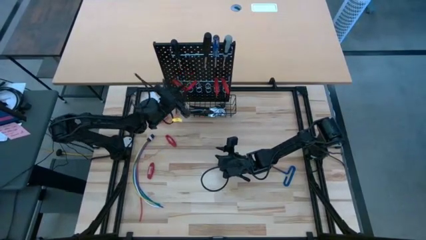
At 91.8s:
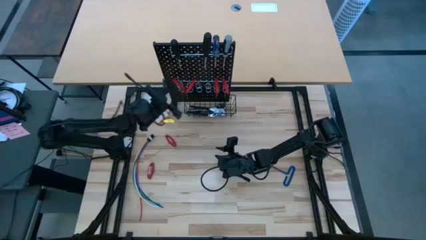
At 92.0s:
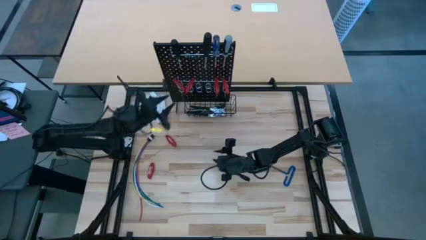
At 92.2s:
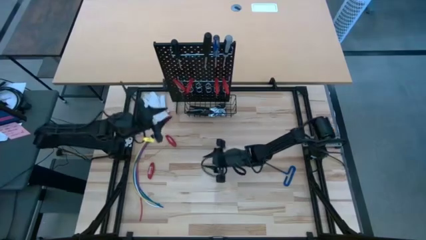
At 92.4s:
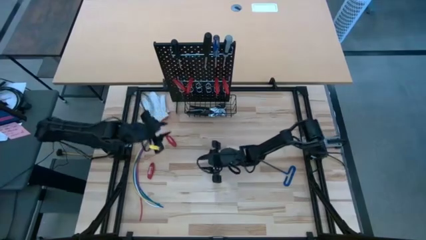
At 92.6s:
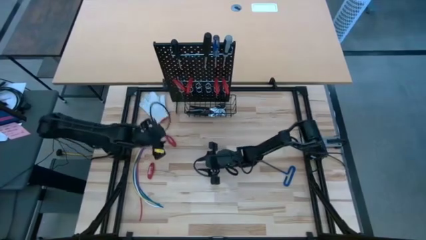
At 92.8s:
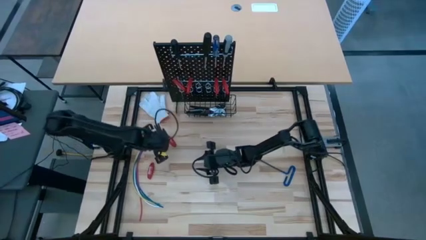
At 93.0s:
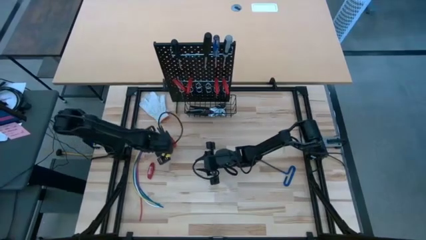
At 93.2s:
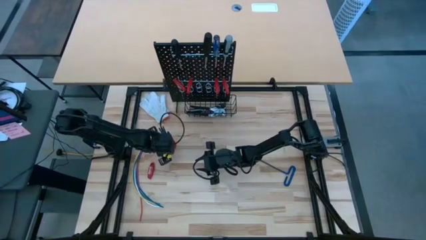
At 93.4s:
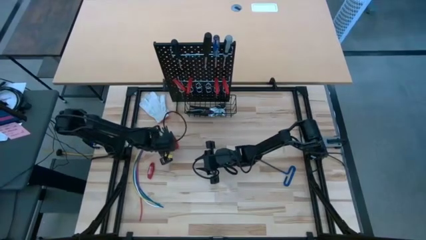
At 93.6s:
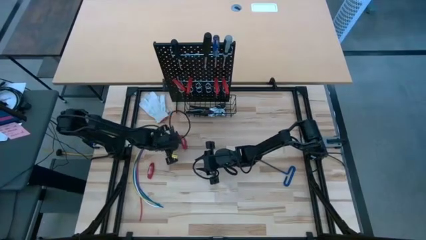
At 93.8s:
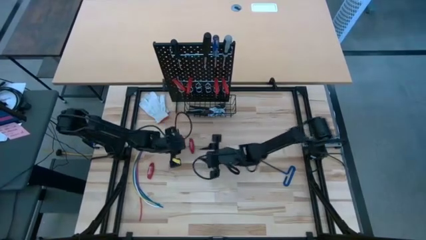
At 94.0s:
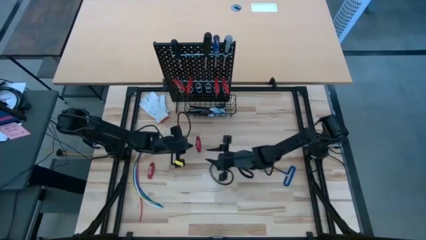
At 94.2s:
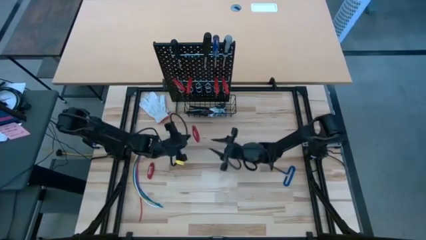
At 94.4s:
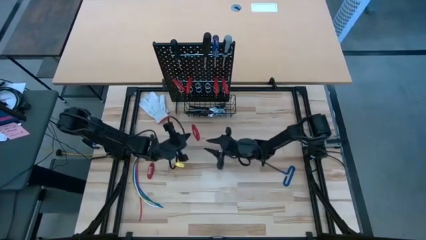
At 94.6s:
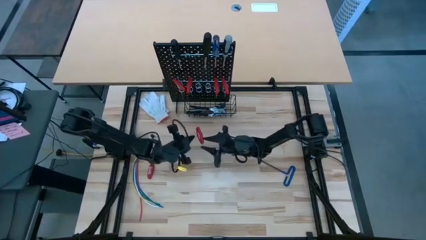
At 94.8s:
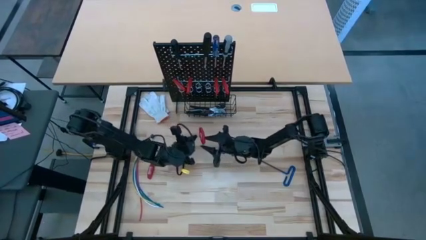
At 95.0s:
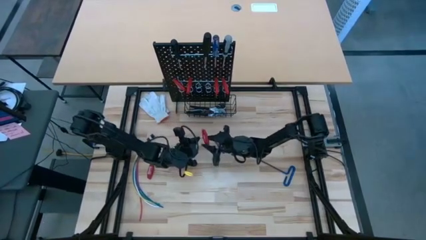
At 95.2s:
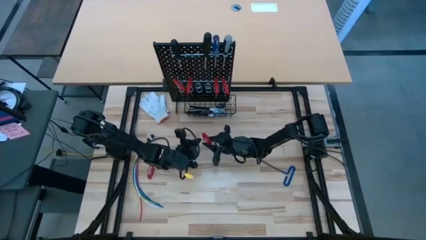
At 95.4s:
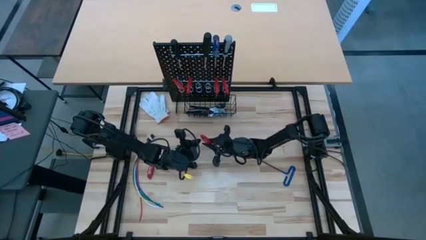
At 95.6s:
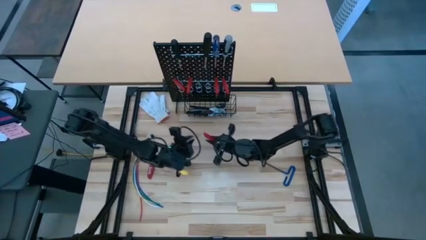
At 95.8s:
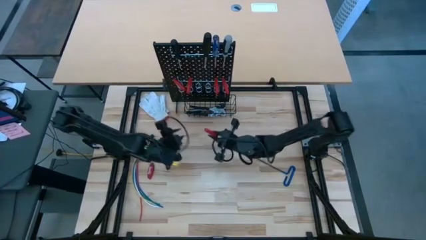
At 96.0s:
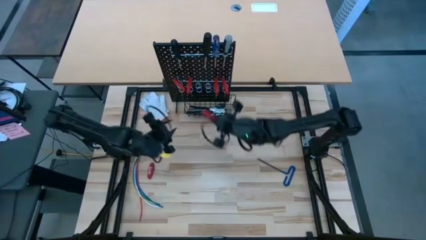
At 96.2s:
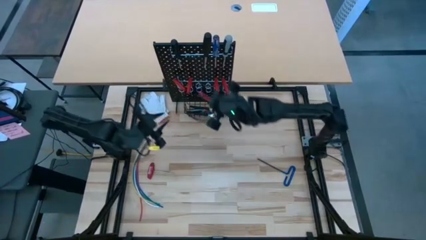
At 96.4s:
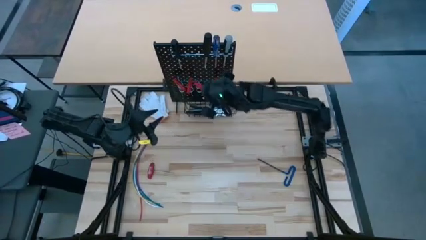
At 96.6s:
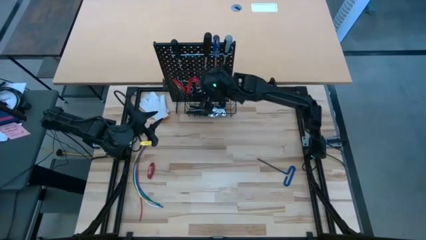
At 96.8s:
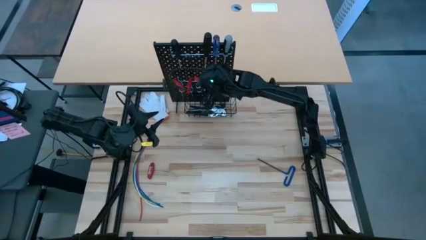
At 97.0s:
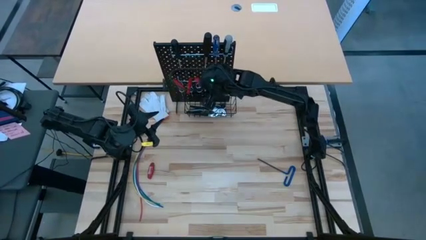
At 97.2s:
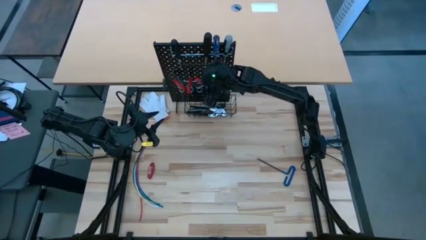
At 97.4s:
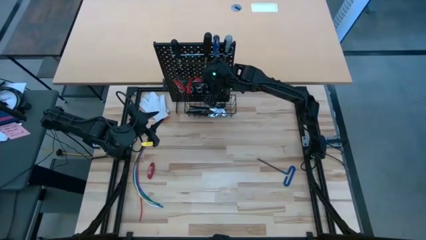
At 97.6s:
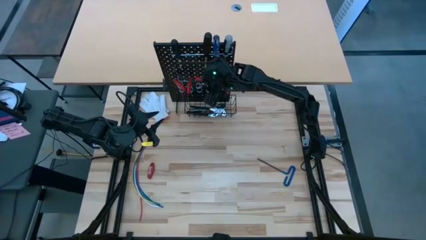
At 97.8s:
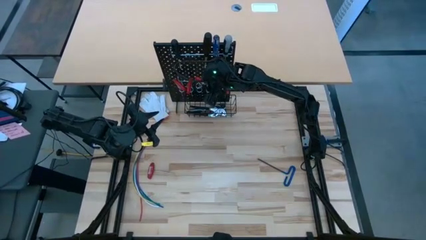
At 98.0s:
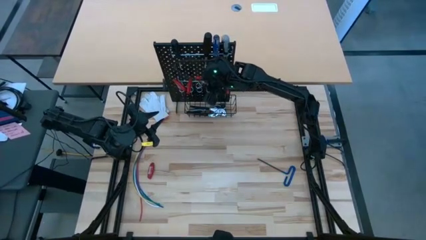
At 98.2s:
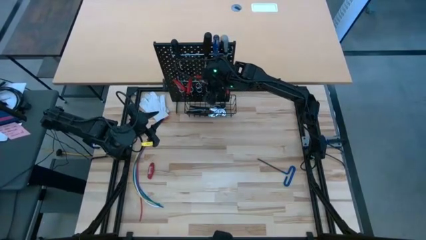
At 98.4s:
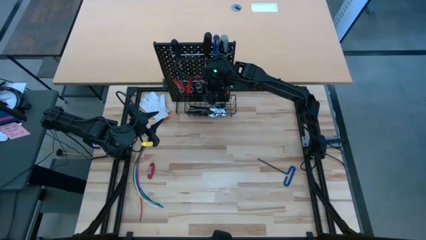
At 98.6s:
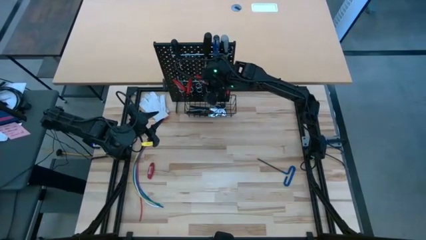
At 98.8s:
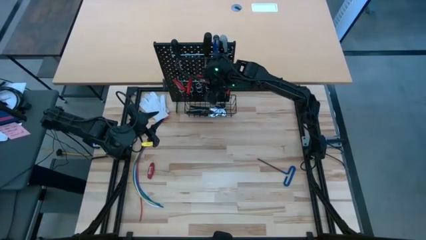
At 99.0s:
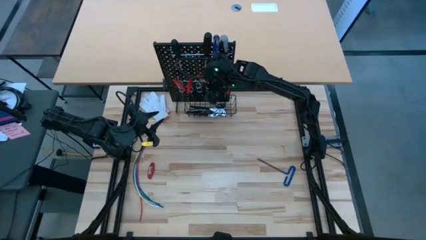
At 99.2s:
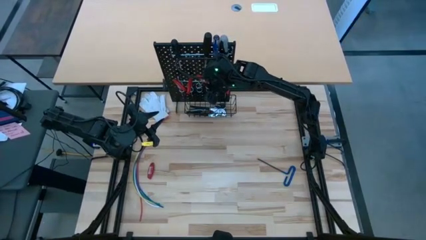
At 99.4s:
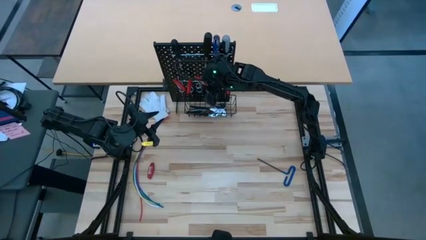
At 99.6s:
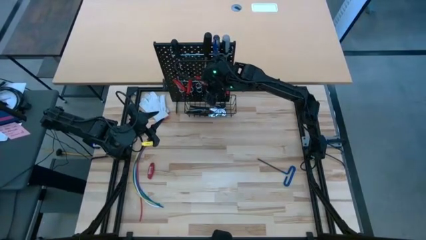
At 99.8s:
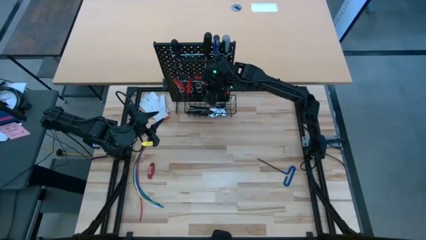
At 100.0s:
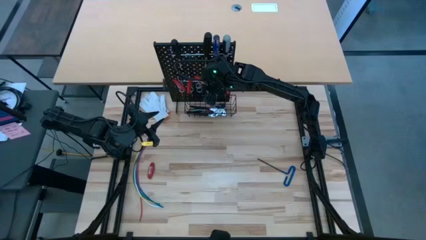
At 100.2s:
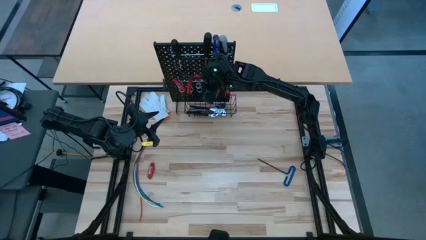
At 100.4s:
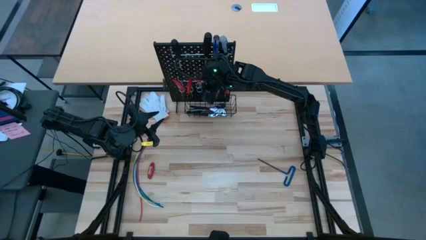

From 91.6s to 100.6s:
Task: Hang tools onto peg board
Hang the red allen wrench on the black pegboard

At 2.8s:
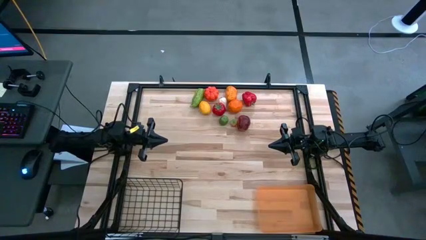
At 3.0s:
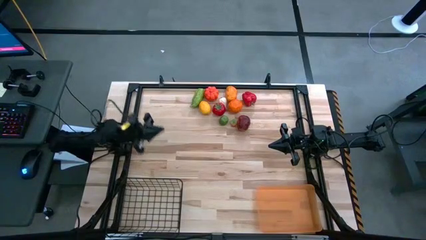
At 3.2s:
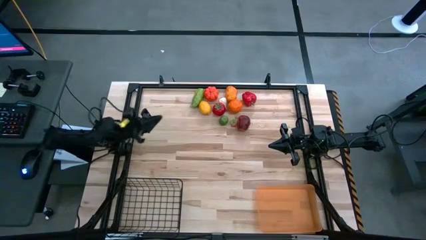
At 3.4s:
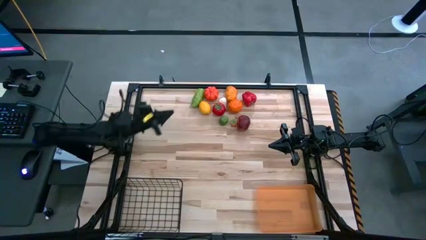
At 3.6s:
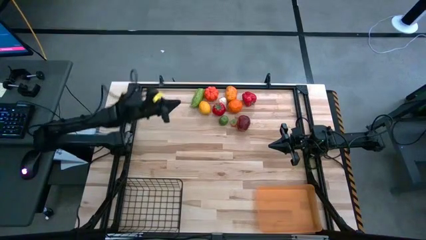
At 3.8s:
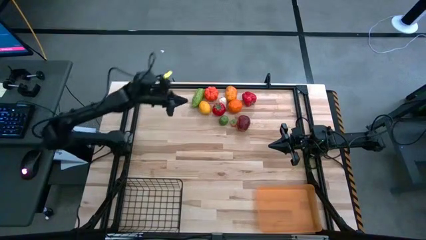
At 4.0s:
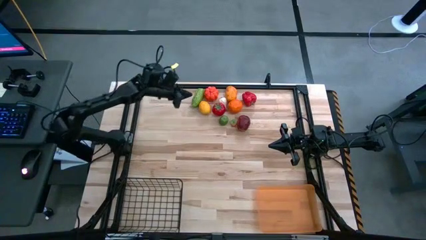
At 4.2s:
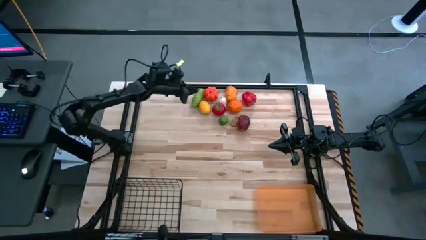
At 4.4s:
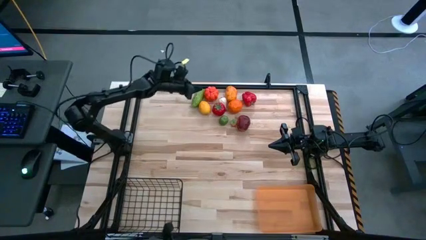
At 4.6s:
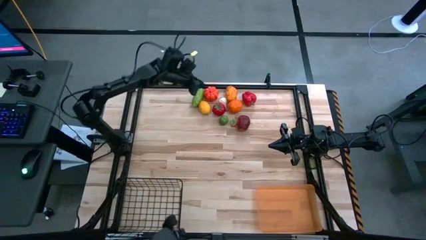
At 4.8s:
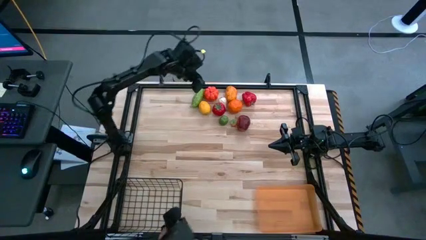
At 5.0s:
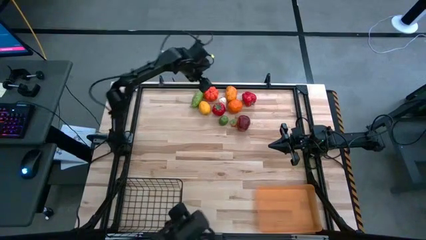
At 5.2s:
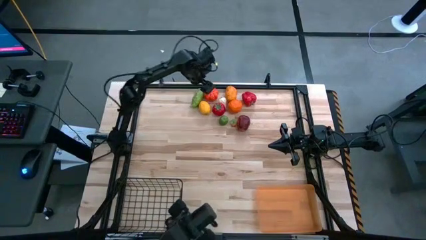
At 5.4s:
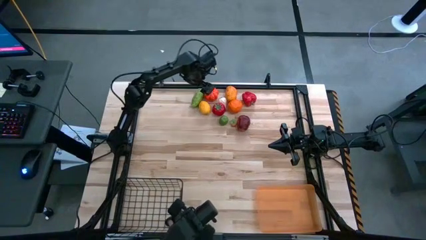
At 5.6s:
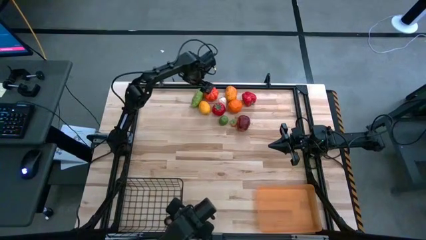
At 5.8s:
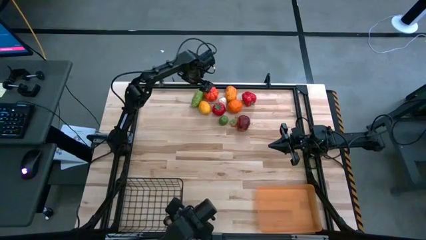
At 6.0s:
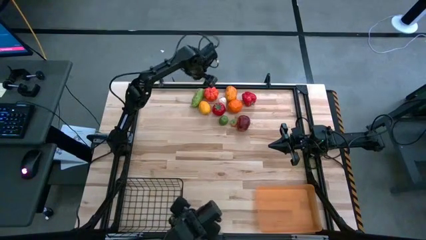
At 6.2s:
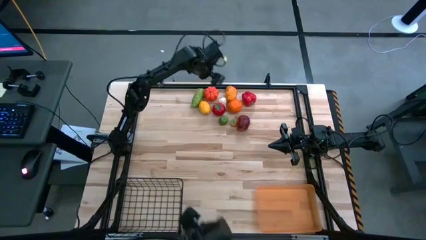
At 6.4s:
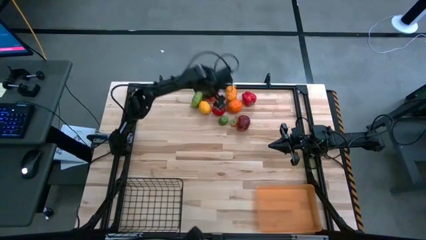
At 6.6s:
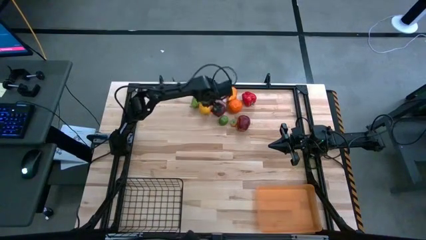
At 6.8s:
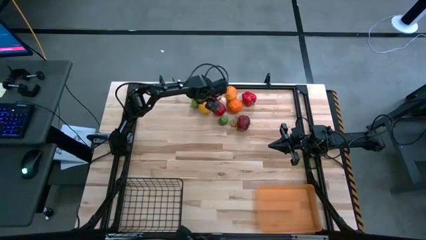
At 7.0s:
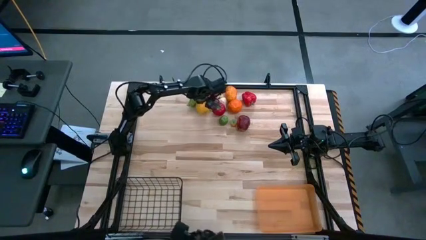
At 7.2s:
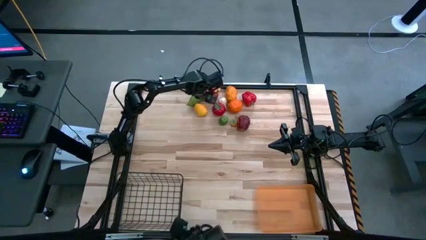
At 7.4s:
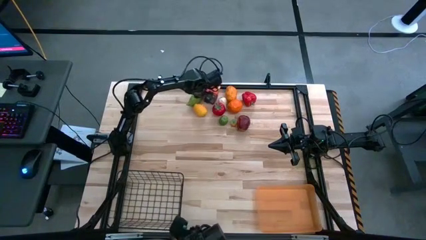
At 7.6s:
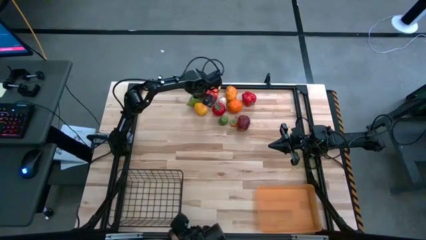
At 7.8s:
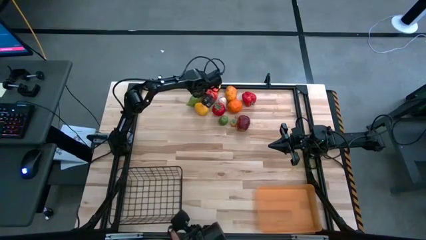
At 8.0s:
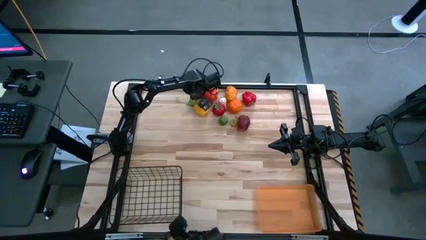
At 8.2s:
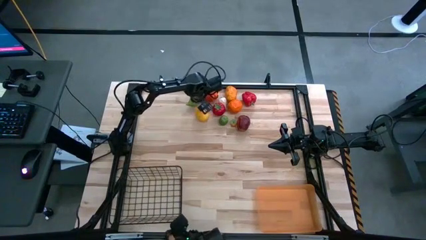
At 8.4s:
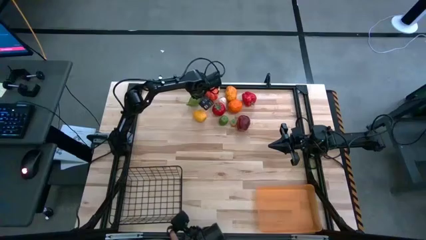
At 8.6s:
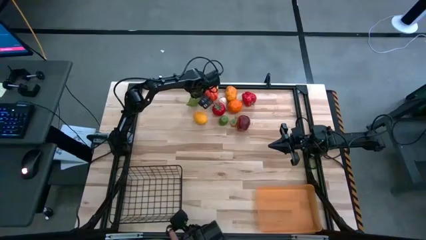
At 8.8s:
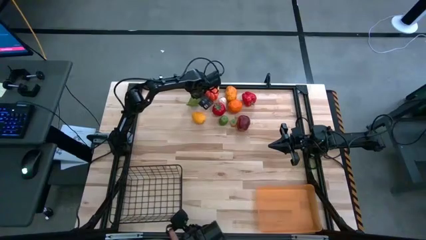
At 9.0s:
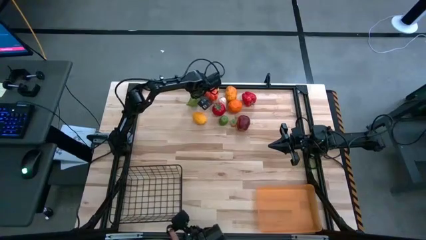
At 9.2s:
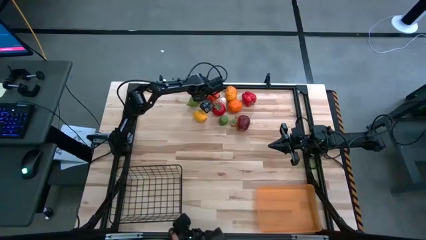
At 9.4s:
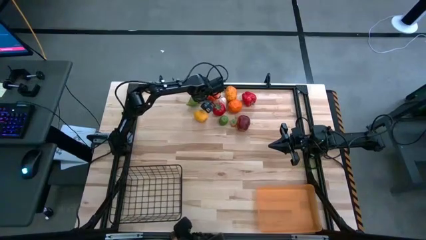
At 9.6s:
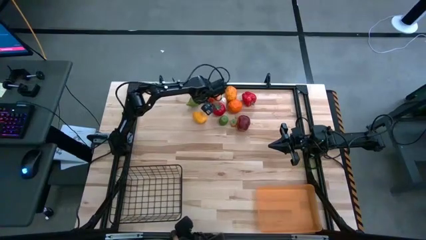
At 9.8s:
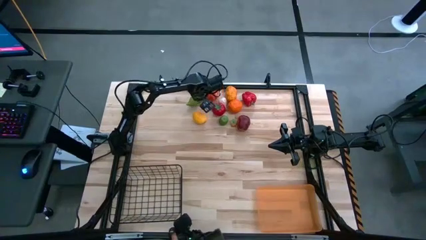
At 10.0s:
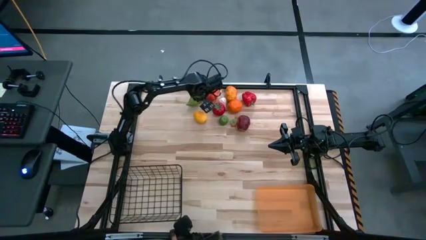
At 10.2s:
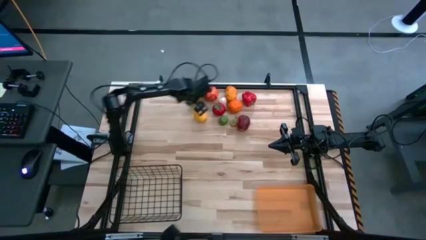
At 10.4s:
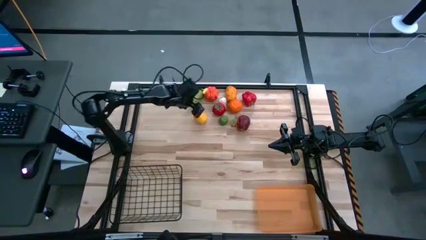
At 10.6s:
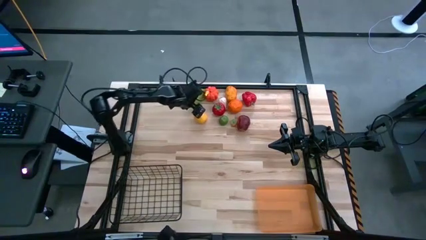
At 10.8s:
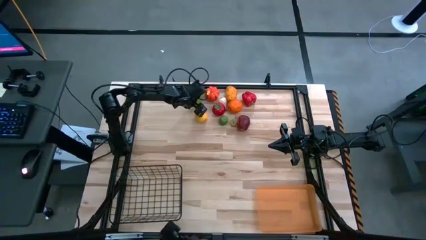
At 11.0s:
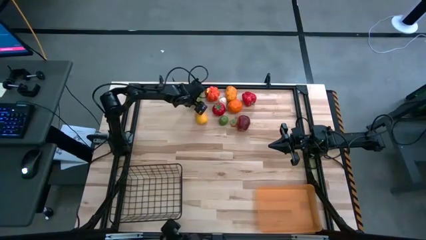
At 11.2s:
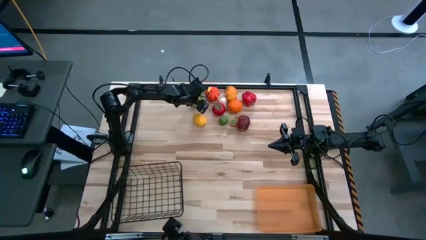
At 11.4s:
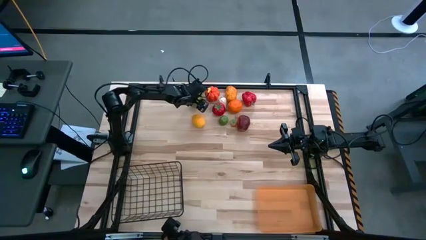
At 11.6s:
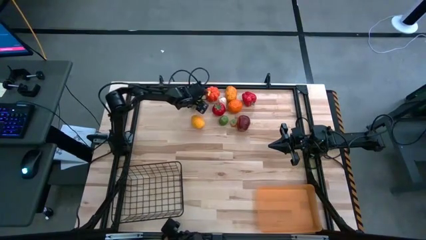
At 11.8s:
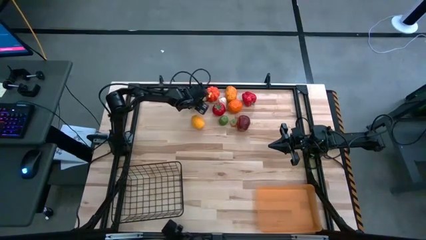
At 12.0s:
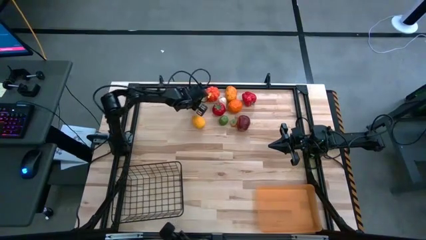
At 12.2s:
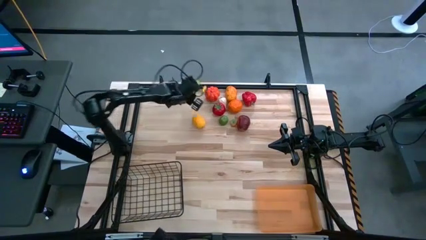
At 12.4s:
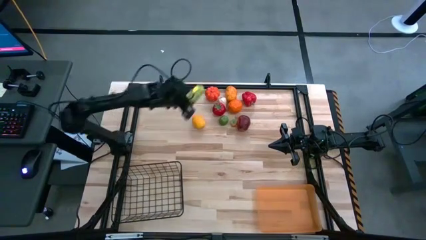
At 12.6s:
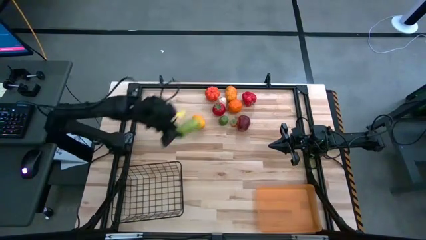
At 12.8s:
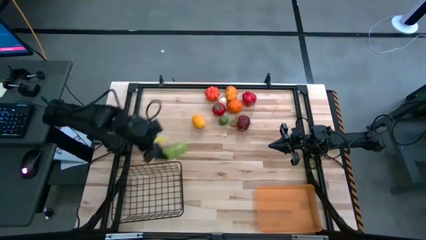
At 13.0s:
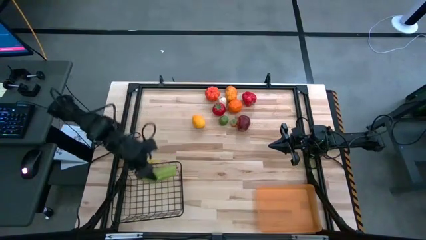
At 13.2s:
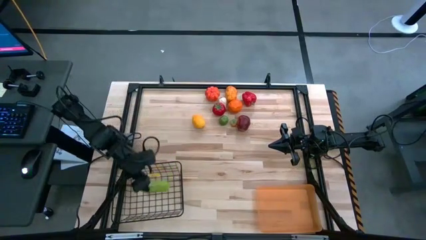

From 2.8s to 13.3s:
Task: Sort produce into baskets
Put the green cucumber into the black wire basket
